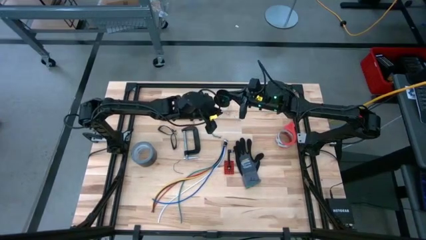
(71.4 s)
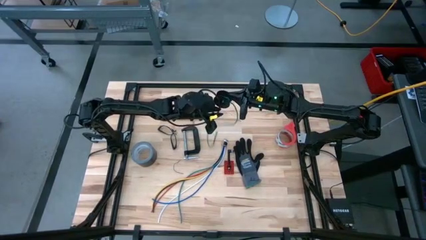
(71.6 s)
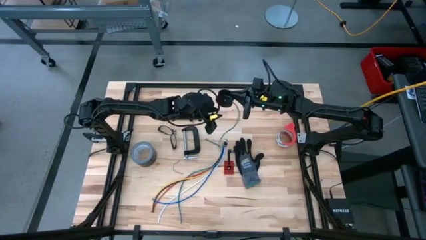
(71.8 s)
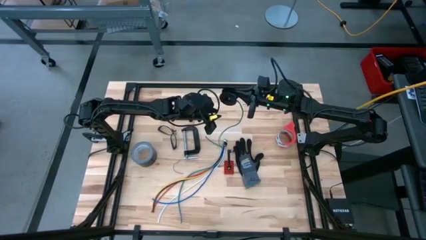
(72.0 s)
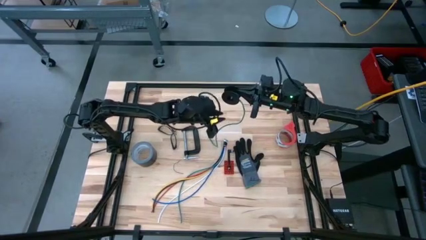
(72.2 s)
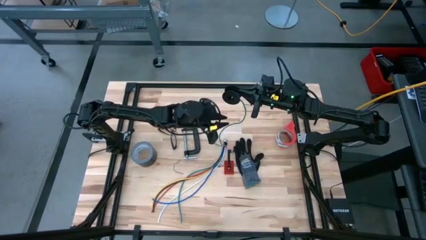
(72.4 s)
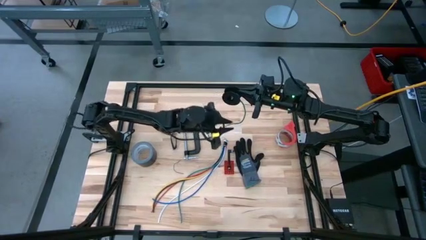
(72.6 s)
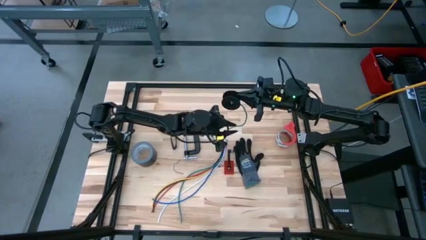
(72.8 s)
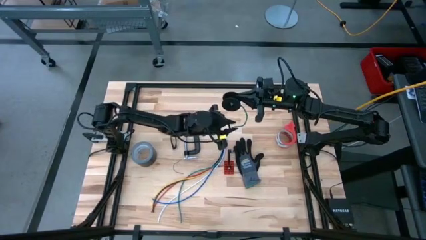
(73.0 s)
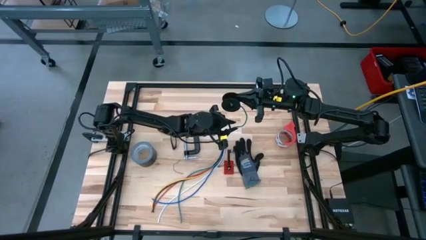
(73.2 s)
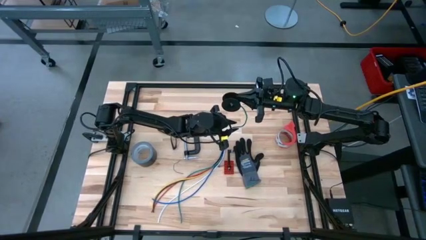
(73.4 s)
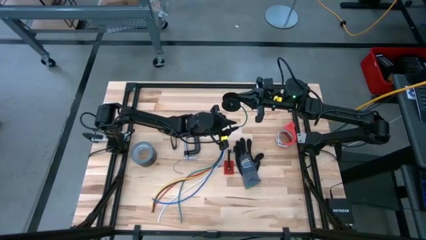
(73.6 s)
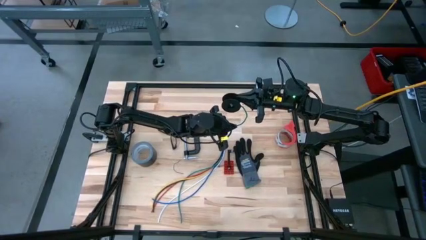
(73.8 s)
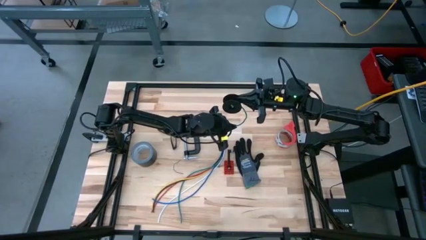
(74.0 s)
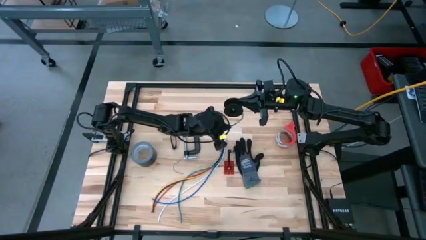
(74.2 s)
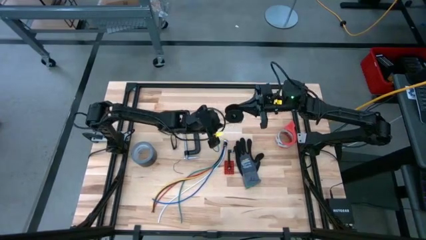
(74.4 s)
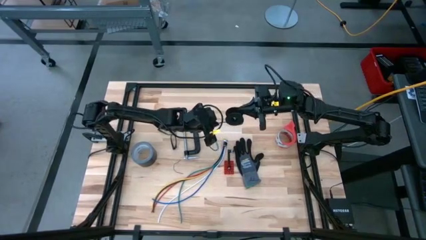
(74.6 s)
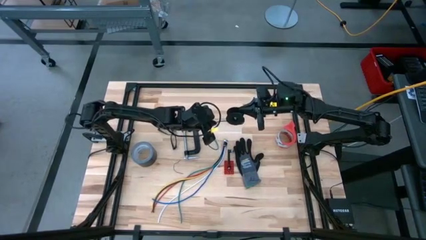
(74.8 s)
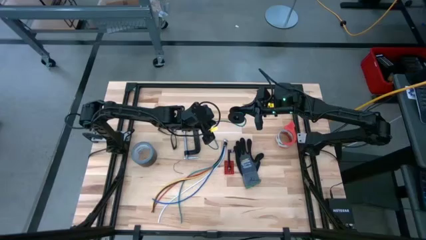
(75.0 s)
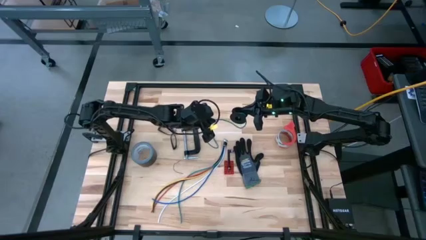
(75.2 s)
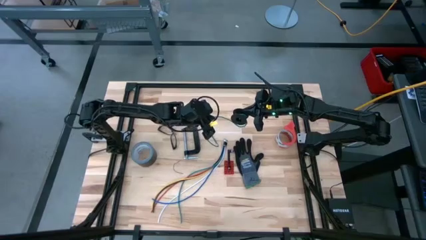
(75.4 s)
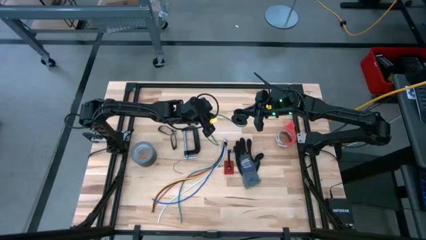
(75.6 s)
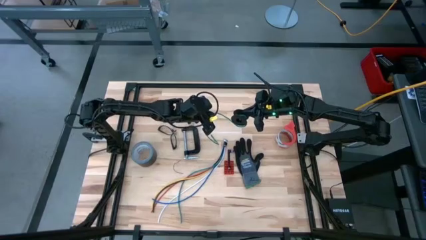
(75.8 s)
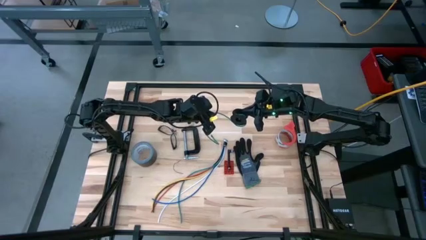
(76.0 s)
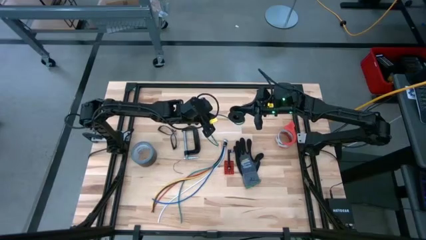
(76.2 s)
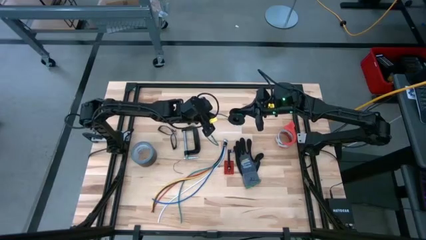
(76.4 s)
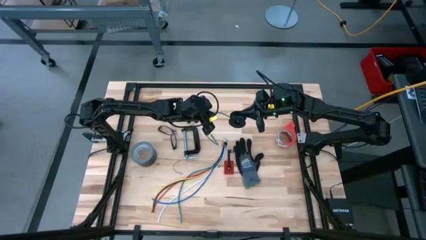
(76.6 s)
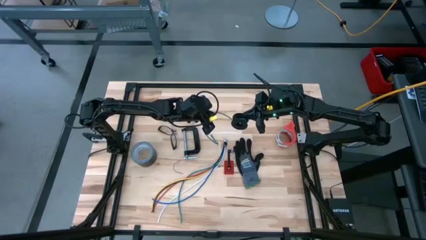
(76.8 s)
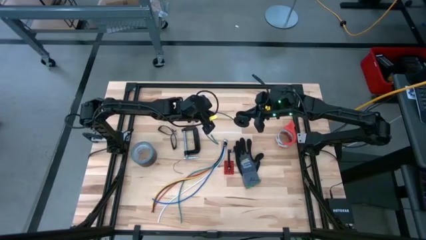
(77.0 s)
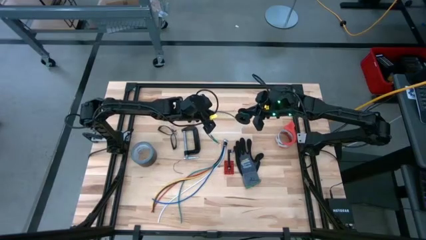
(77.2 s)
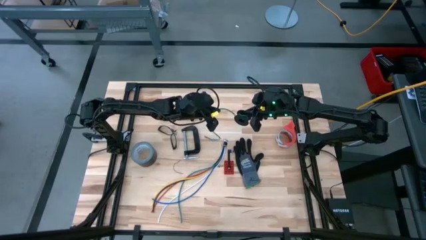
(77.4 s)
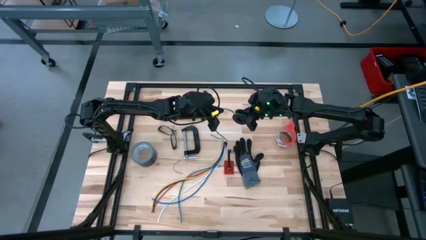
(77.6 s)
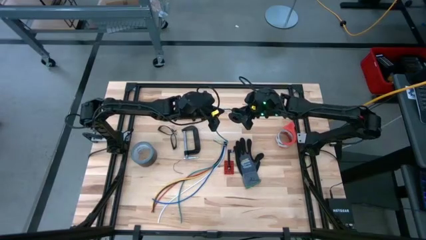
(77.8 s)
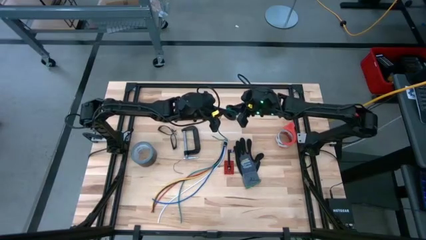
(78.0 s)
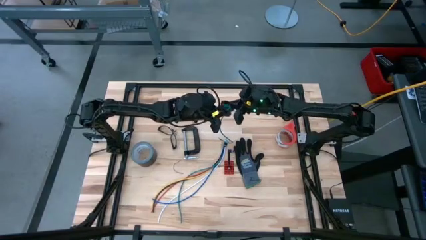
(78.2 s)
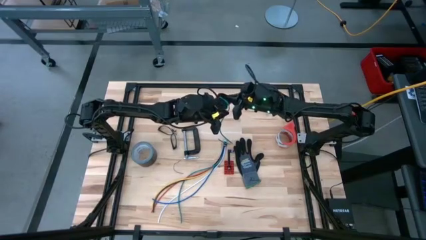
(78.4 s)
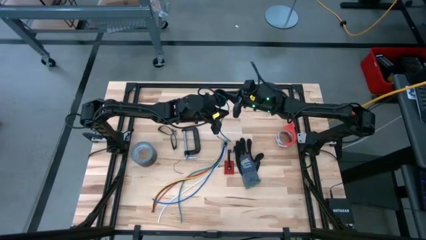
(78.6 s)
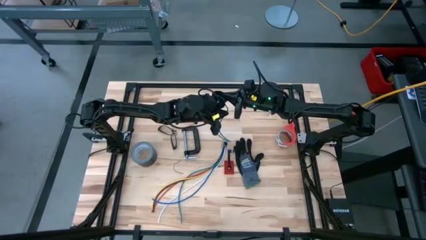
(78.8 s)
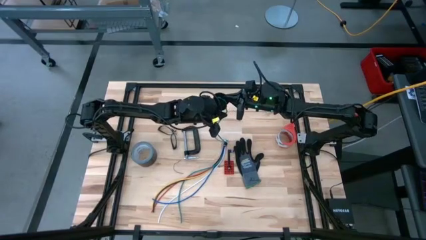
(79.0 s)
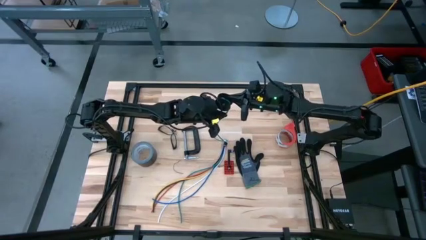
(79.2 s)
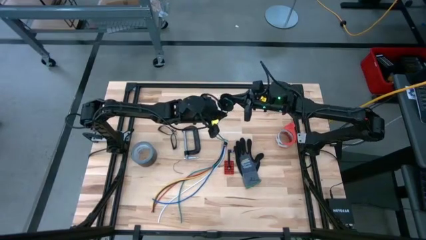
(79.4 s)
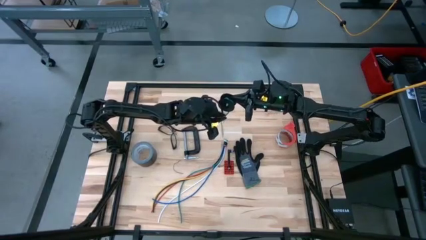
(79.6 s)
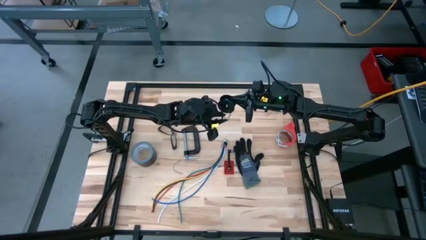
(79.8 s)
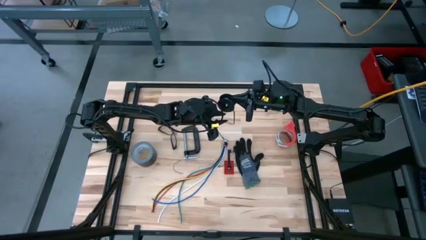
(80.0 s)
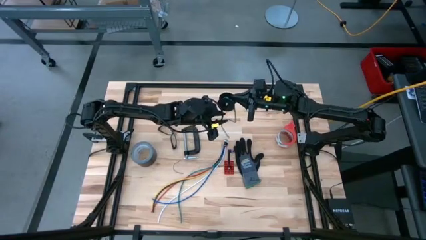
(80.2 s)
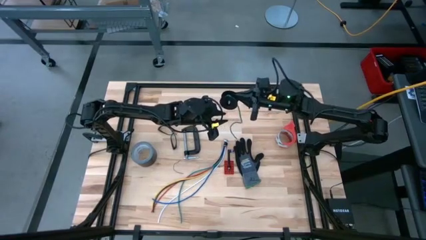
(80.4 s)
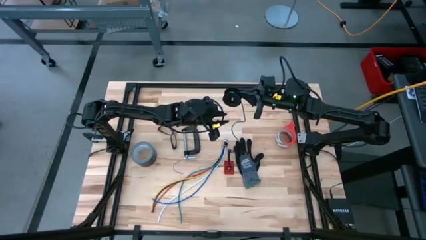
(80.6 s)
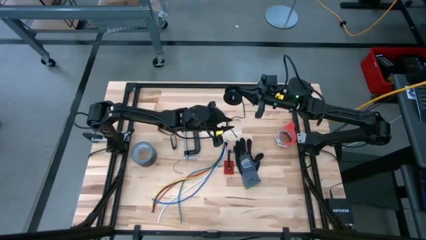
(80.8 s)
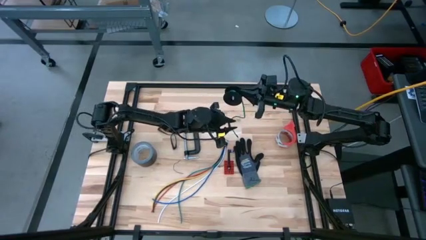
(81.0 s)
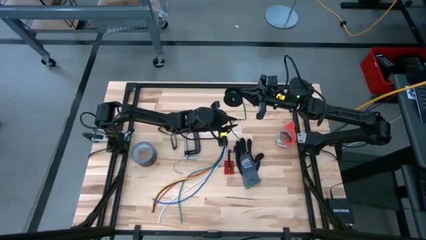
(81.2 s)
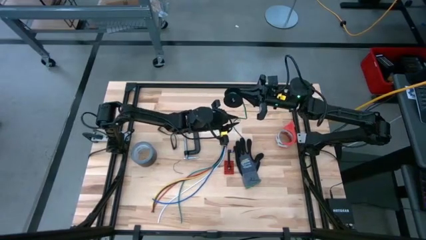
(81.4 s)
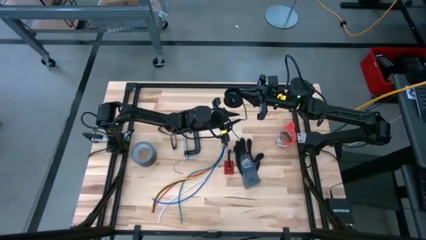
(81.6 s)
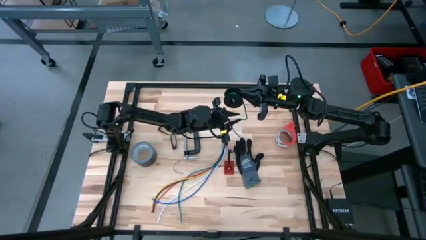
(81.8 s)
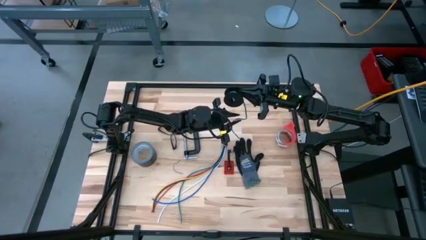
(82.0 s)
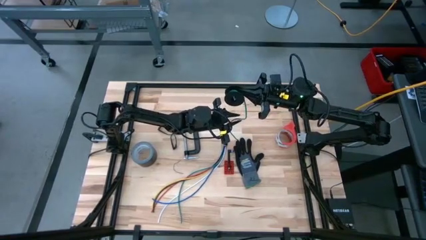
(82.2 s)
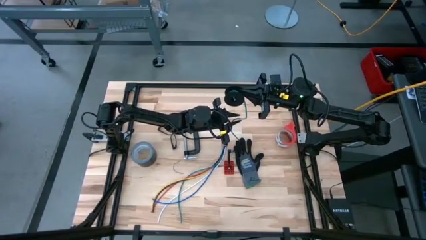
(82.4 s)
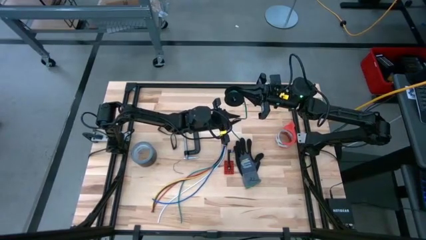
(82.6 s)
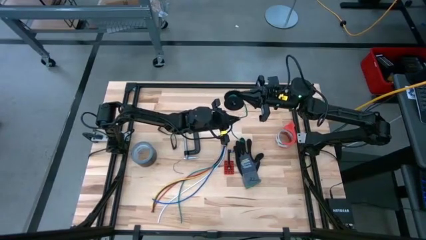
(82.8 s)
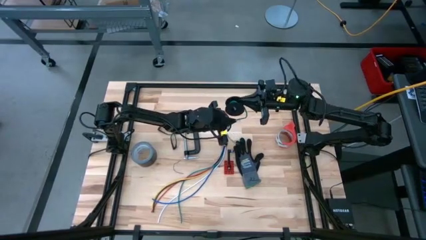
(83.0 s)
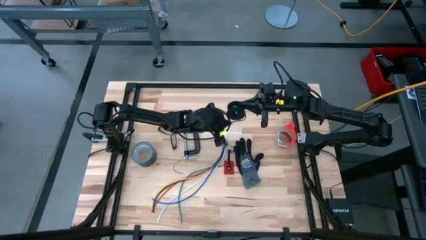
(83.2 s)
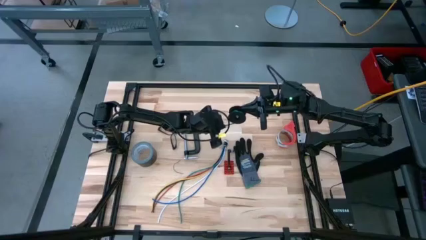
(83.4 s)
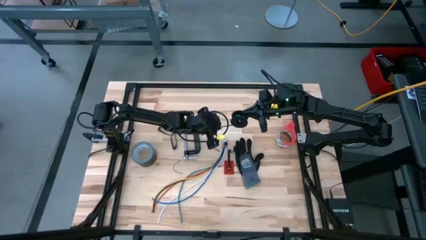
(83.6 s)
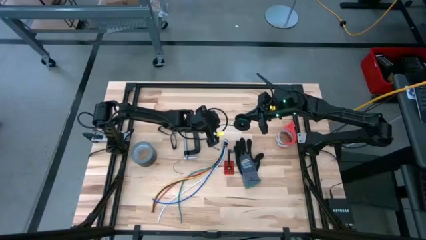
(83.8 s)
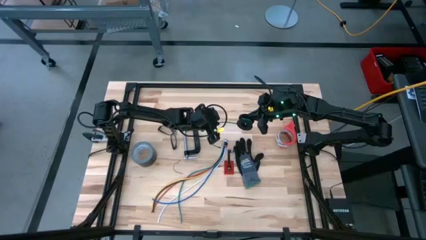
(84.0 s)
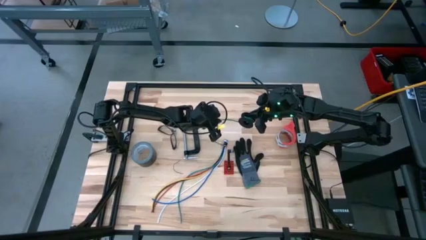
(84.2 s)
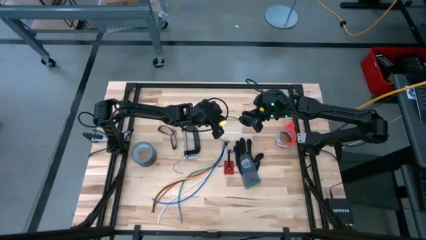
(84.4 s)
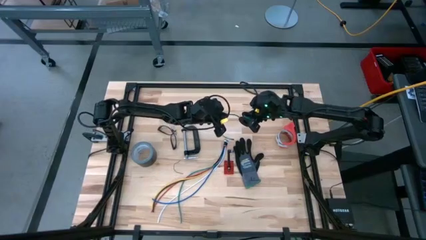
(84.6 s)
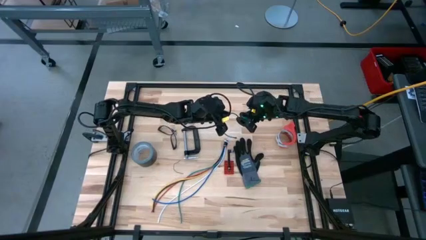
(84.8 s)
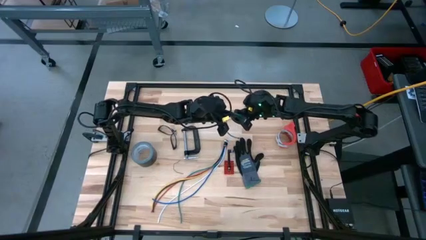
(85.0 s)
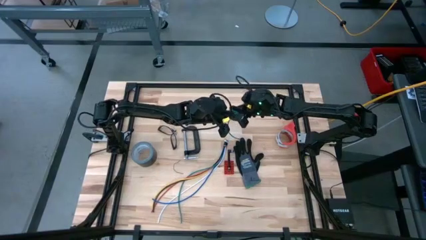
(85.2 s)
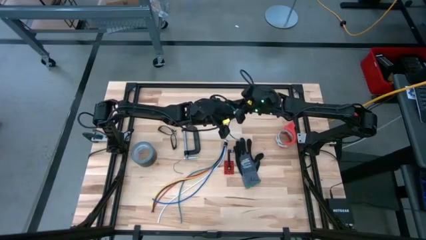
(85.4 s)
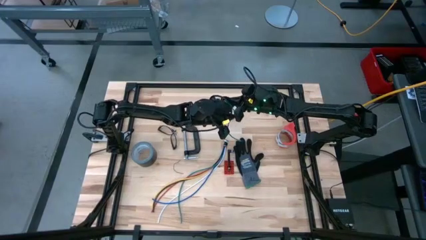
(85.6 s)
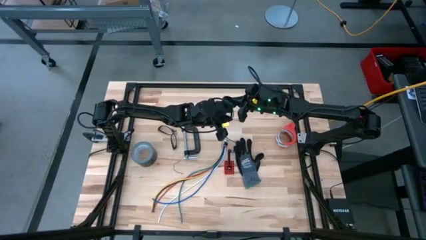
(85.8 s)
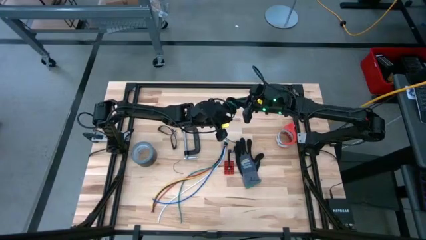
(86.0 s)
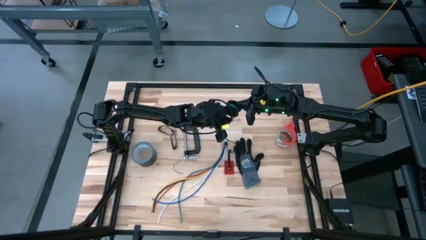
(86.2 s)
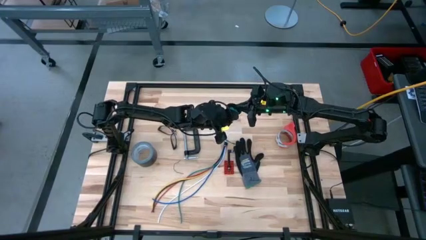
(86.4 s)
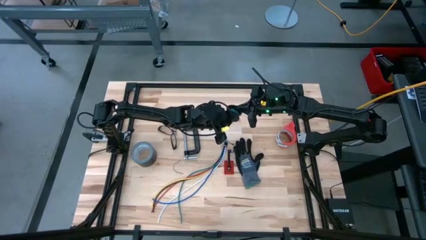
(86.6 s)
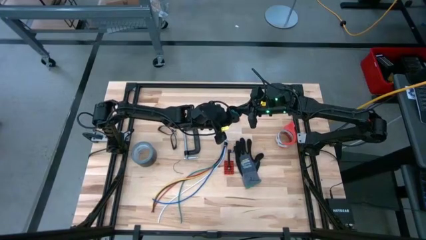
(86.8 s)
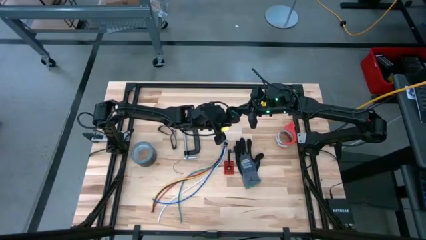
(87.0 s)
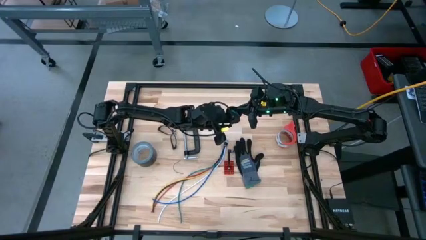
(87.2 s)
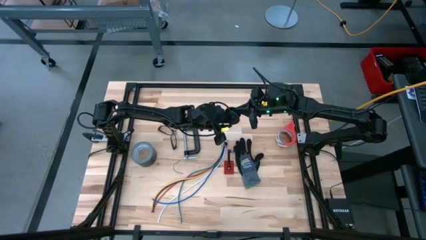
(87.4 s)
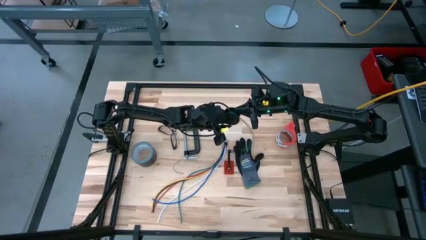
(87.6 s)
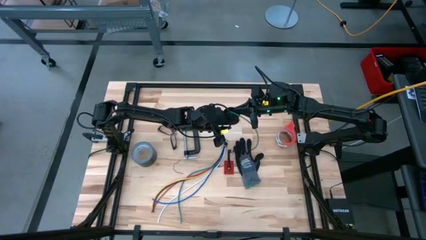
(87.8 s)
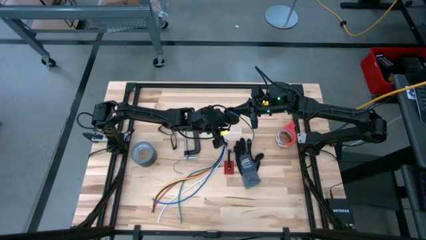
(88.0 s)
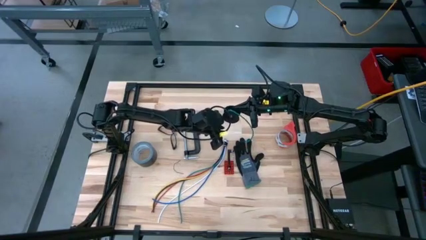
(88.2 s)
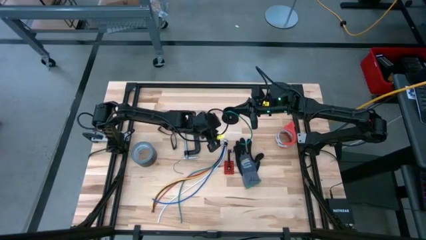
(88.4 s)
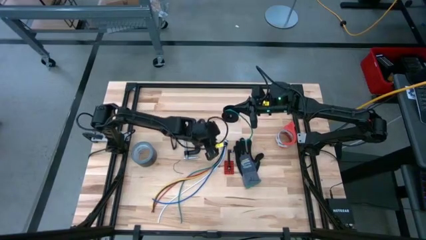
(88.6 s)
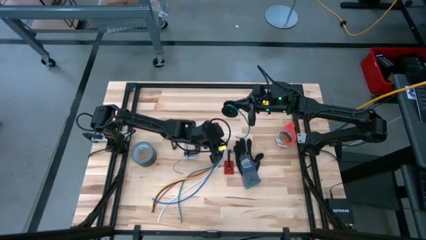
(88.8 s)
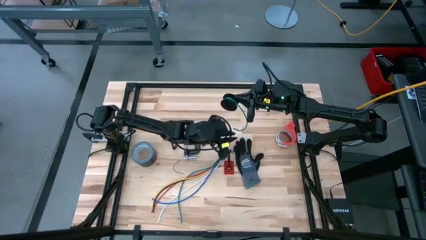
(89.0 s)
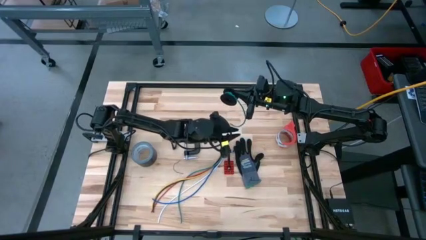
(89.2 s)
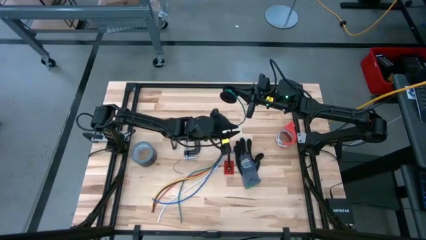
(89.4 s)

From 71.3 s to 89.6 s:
Task: Coil cords
Coil the green wire on the spool
